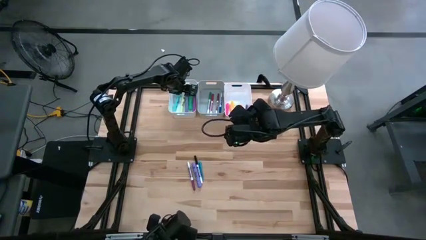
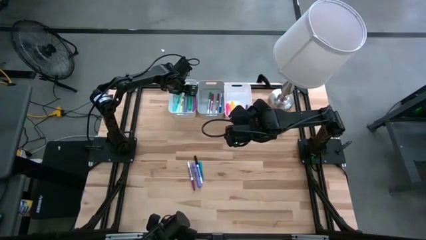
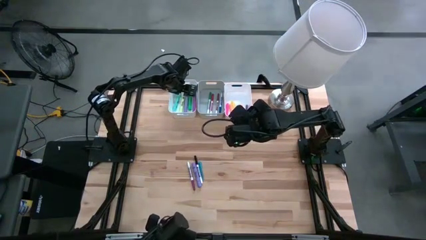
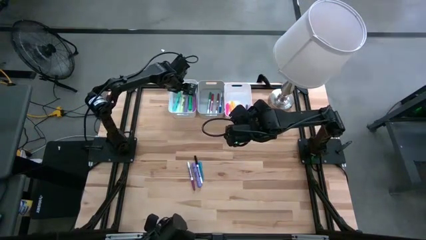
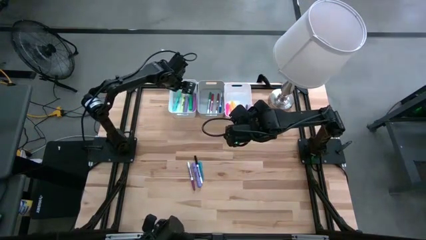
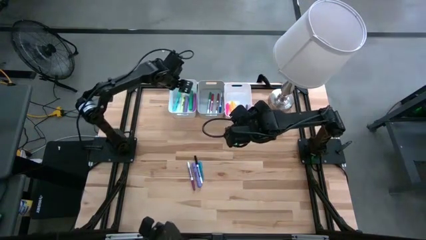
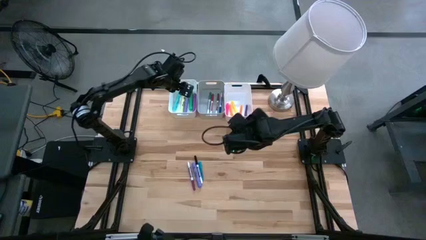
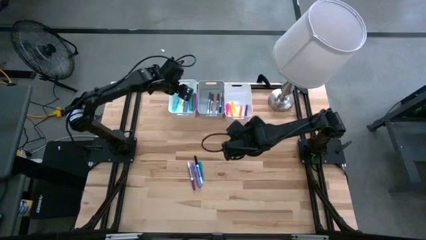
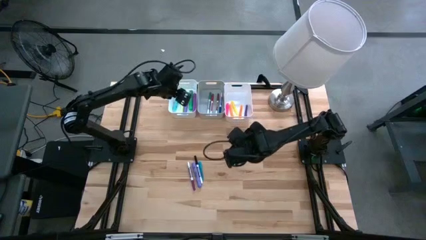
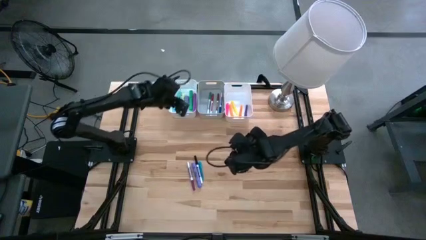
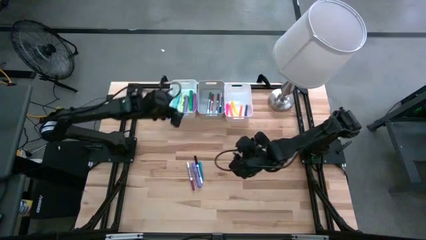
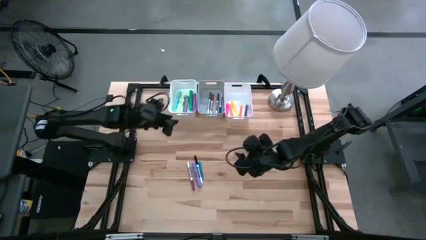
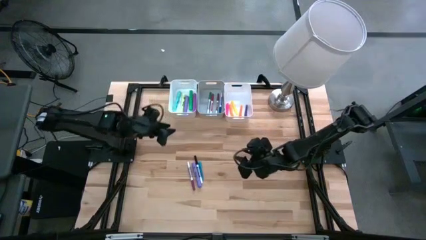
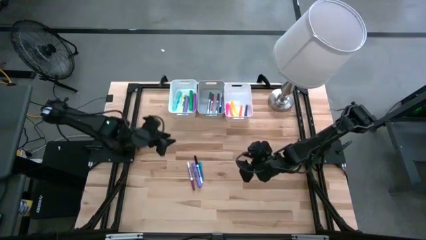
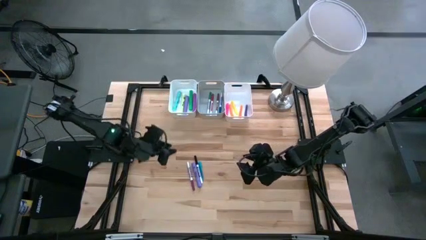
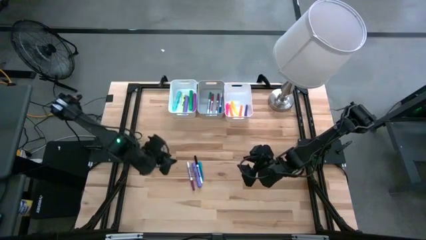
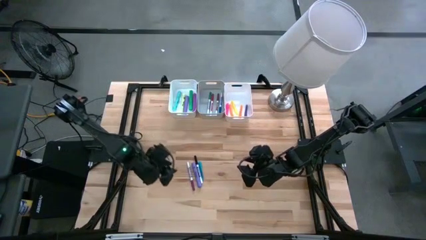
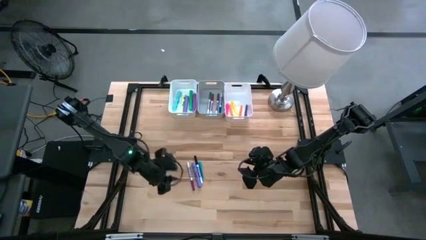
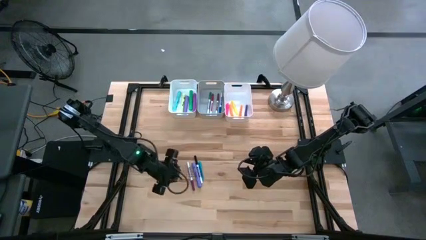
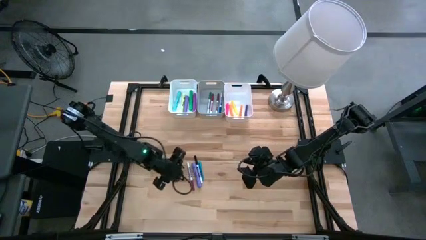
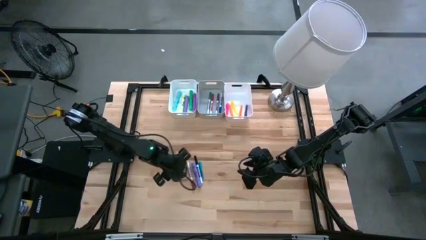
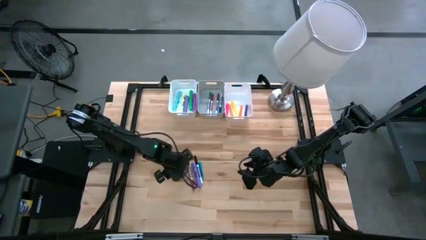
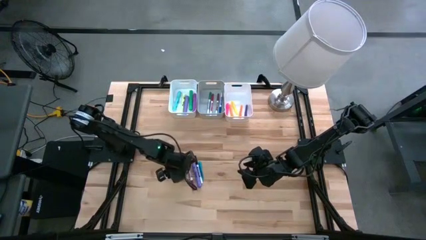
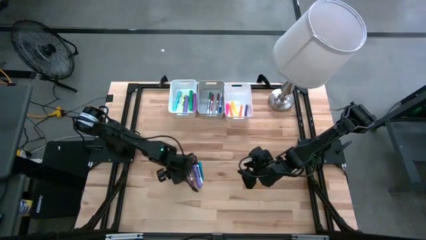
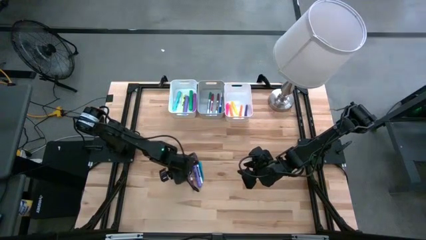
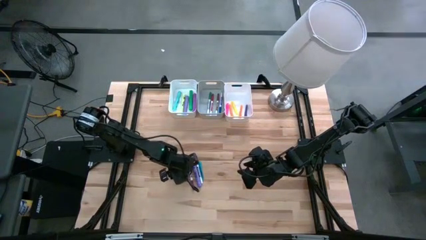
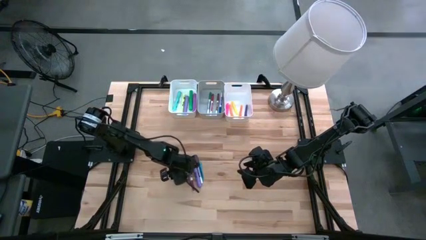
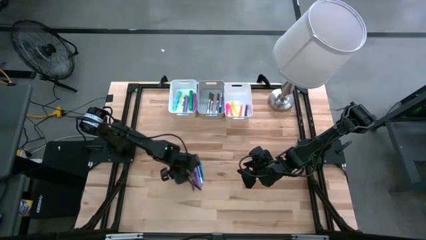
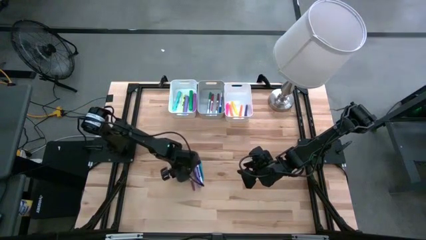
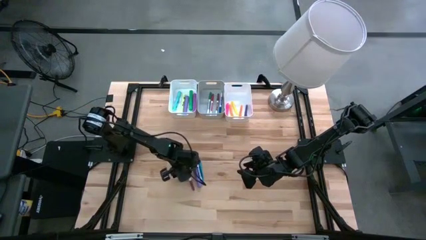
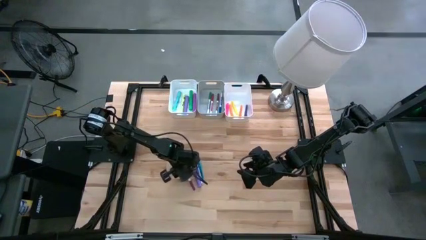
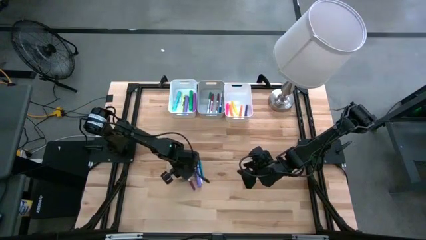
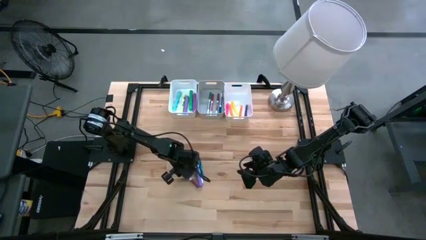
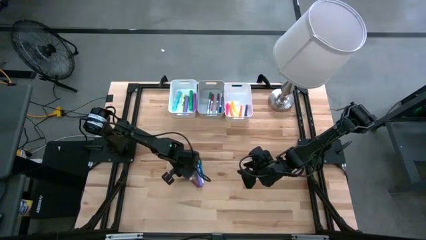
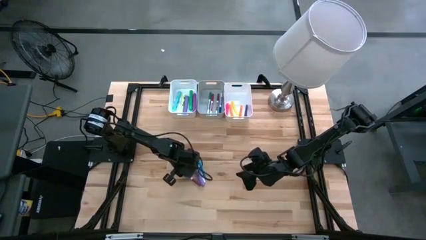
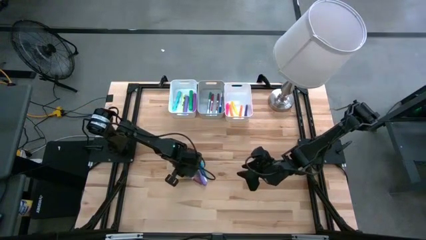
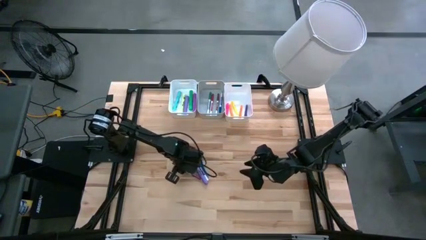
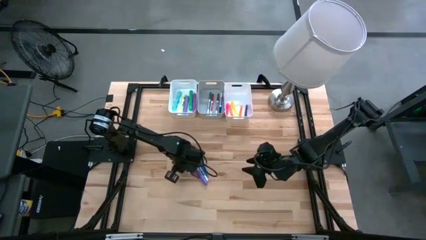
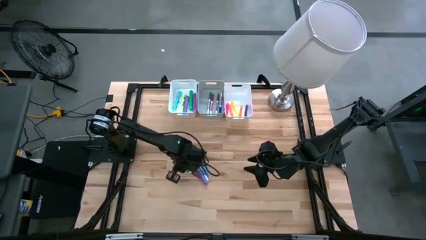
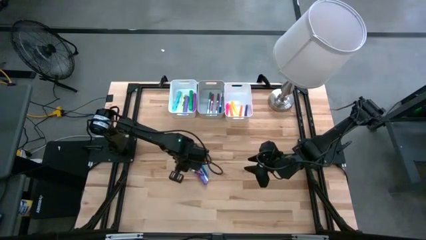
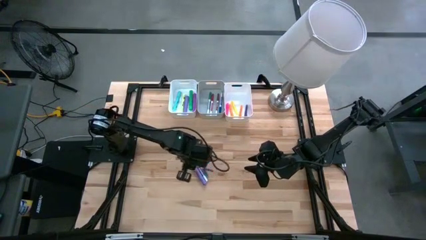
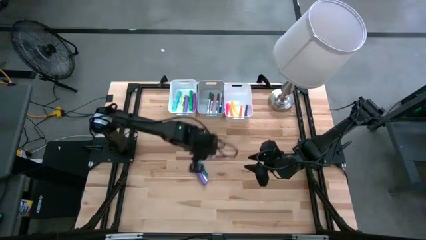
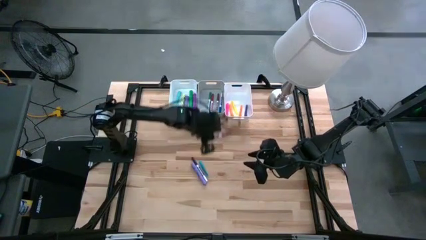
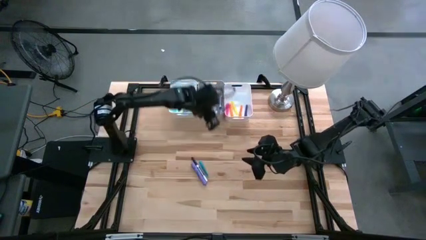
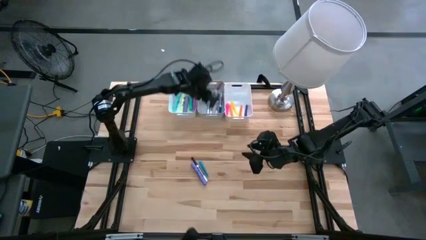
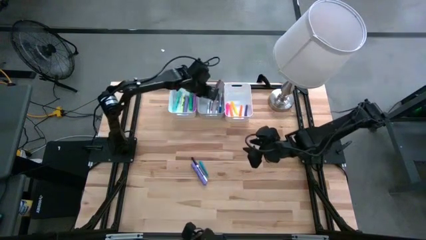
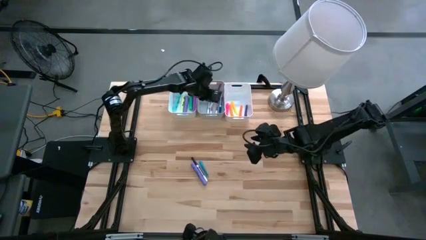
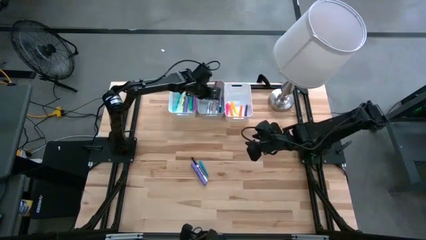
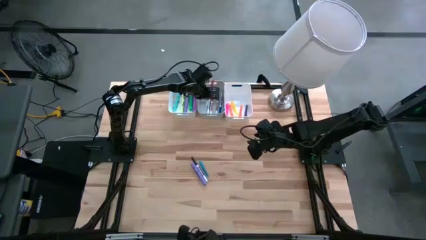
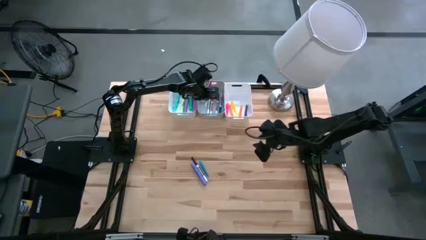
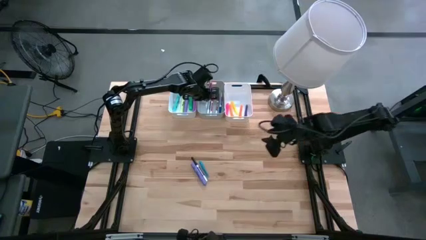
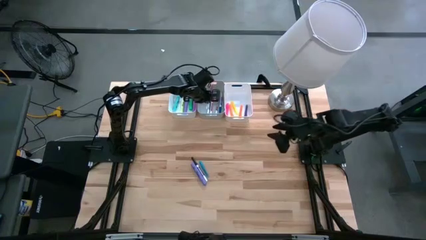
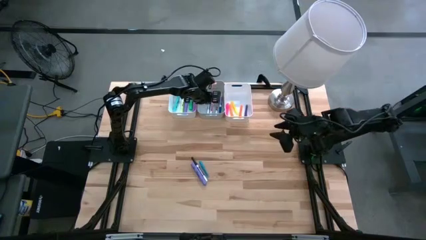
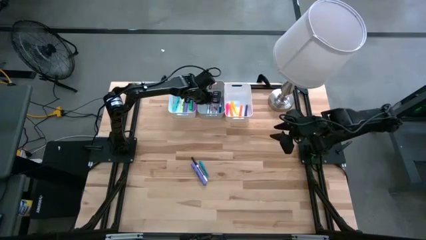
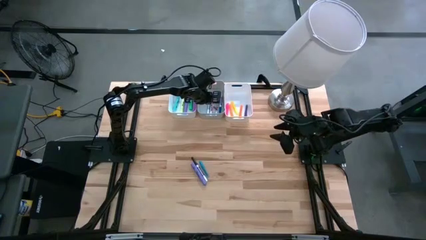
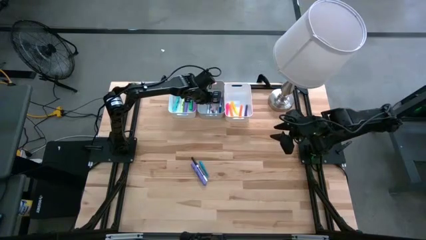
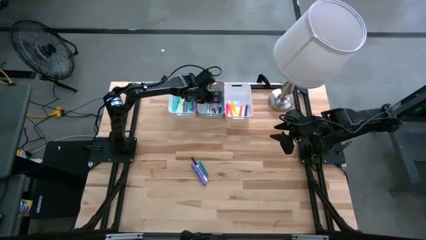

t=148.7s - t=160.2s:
Task: Pick & Place Markers
Put the violet marker pen into the gray bin

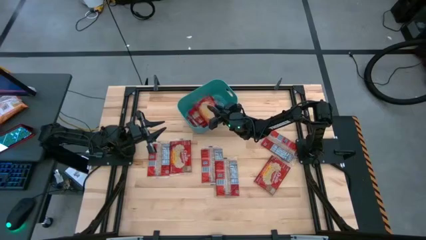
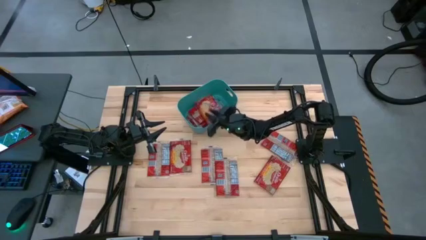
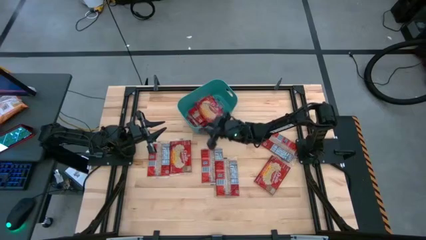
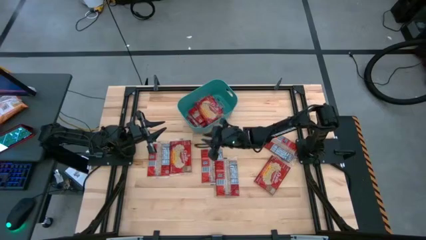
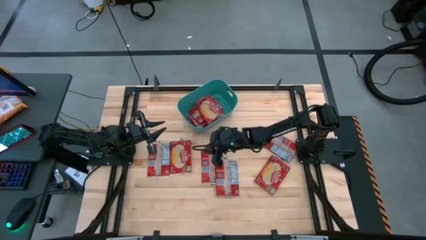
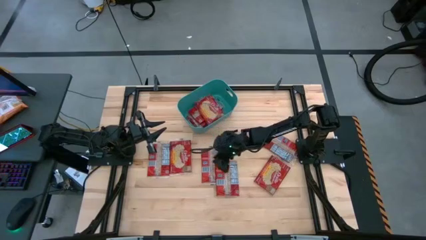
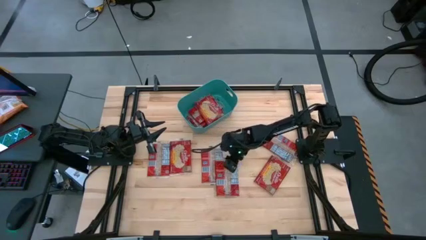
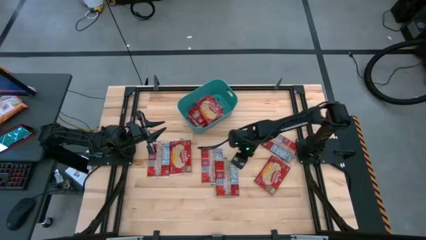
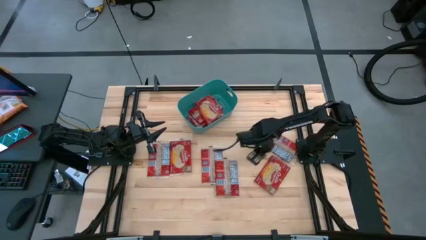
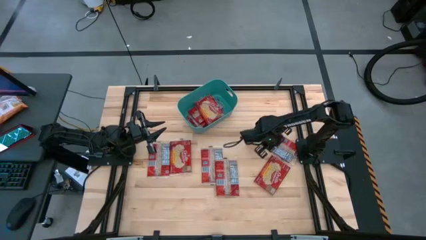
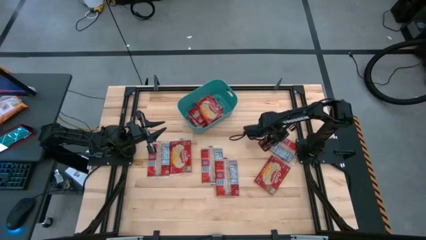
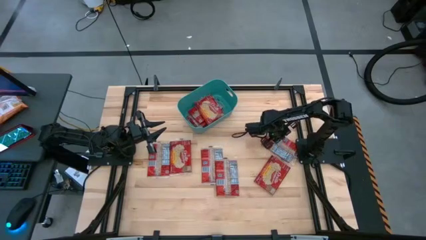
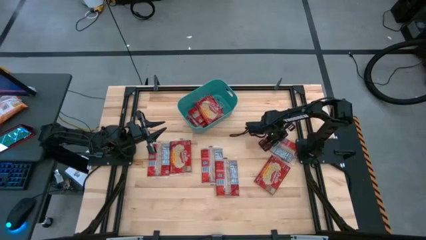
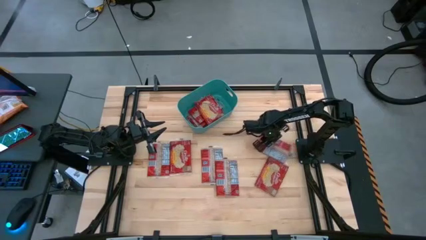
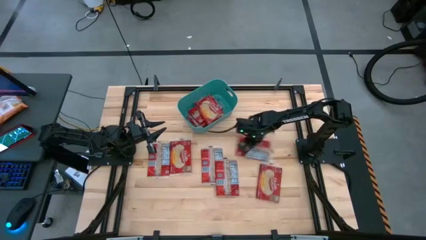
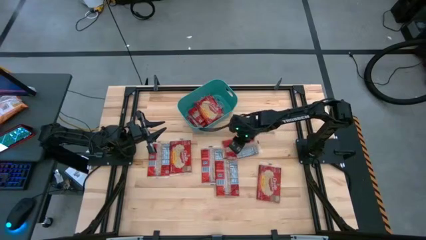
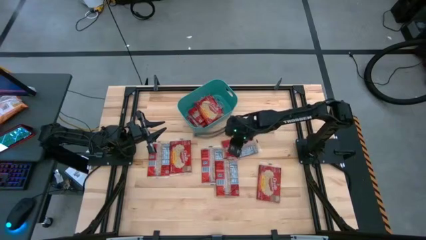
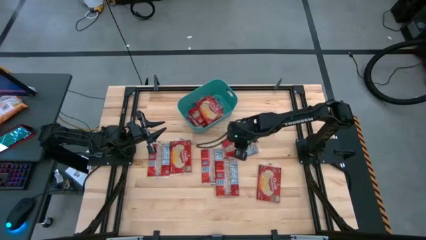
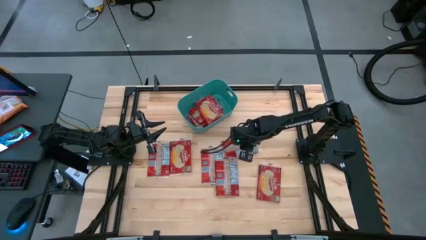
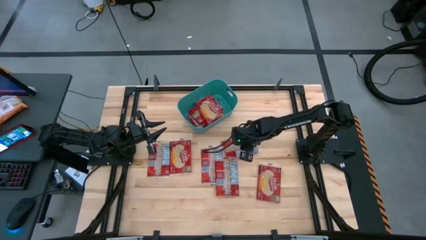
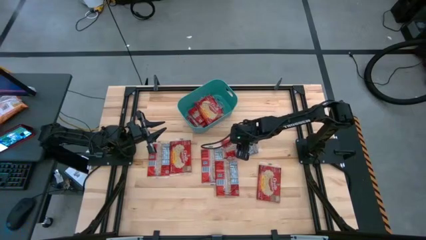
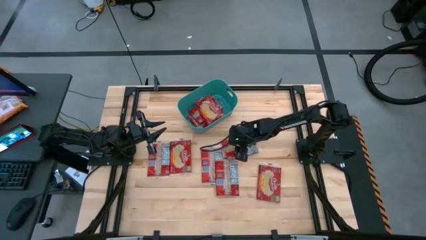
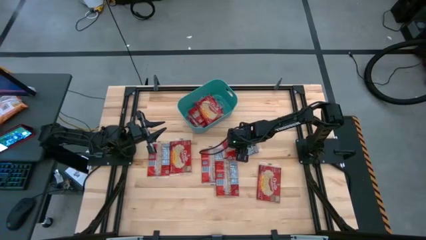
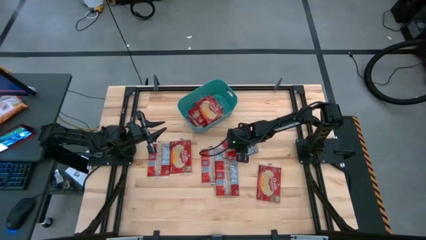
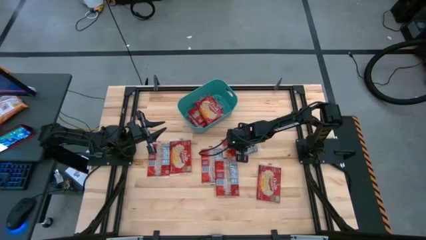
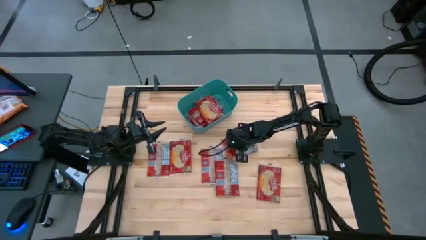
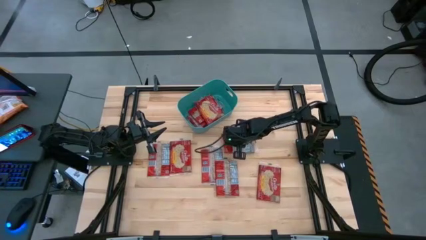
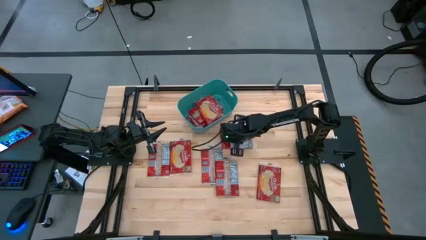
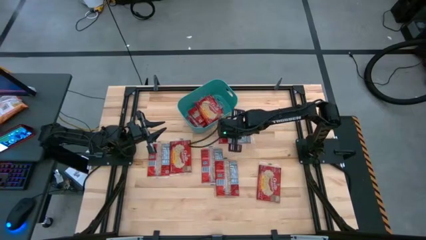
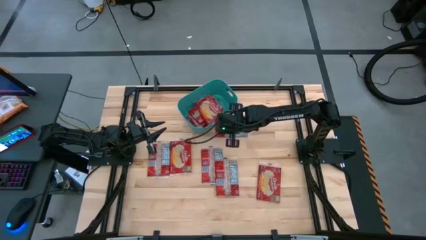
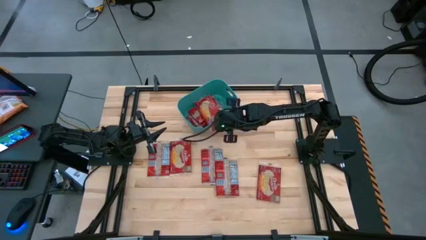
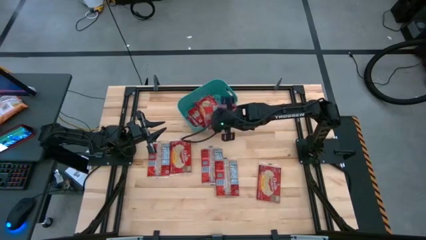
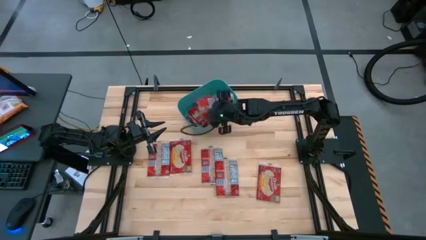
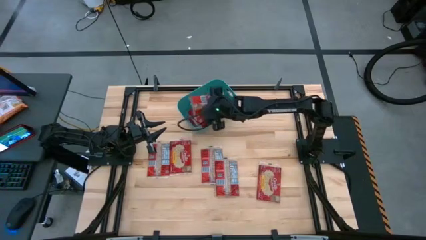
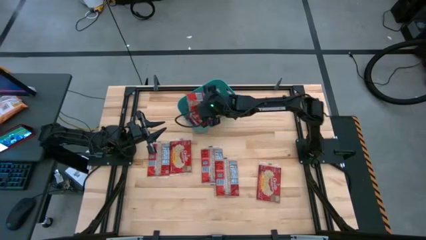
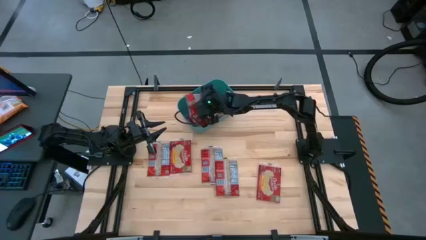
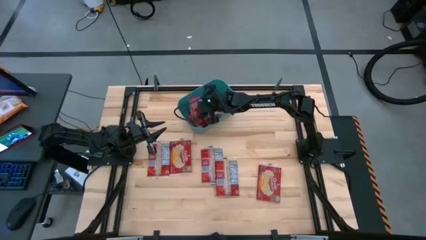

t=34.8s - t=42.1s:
Task: Sort popcorn bags into baskets
Put the popcorn bag into the blue bin
